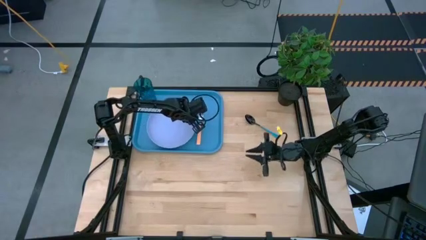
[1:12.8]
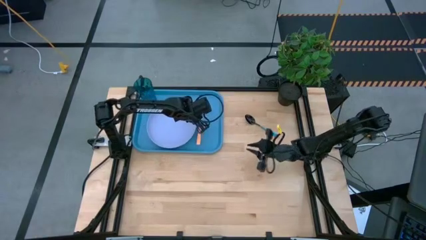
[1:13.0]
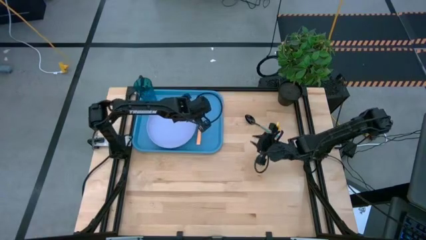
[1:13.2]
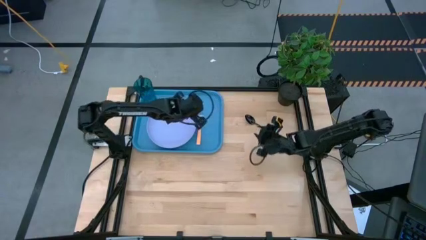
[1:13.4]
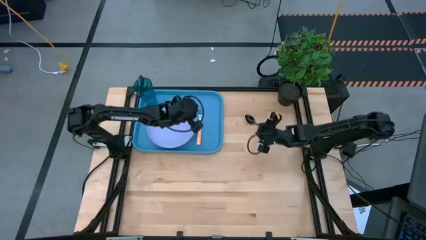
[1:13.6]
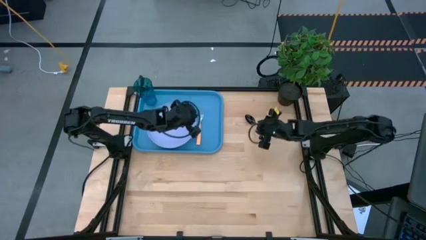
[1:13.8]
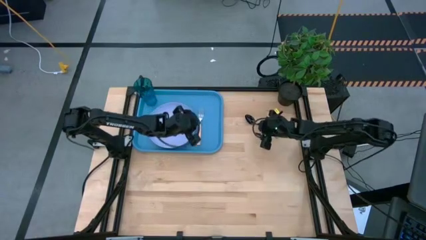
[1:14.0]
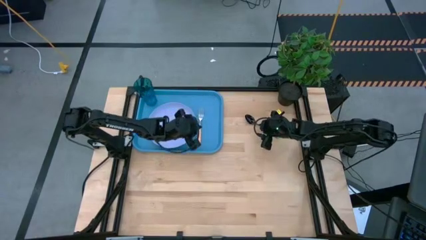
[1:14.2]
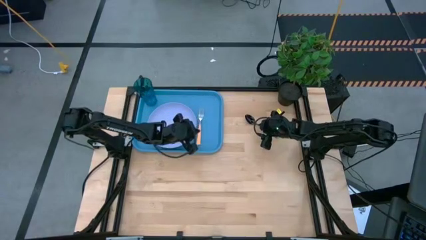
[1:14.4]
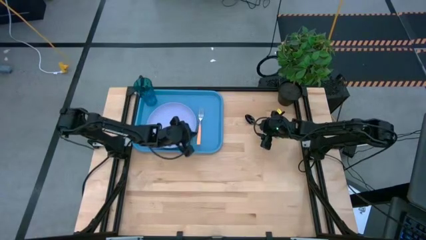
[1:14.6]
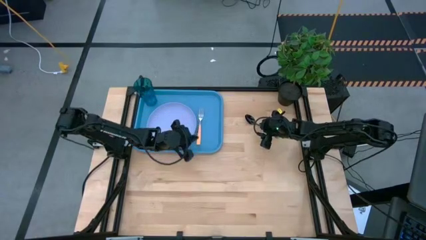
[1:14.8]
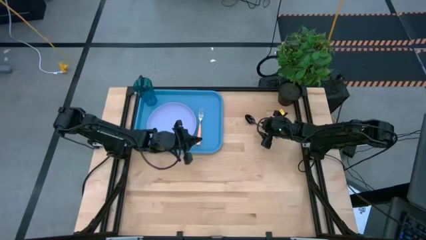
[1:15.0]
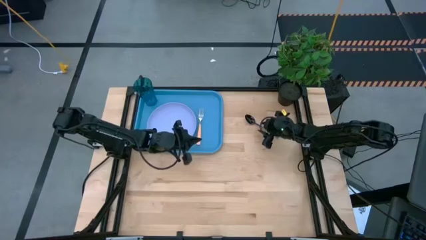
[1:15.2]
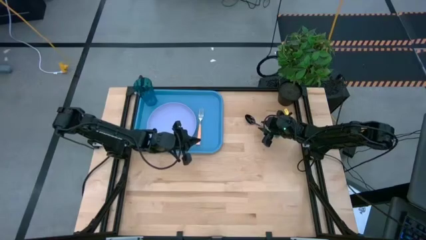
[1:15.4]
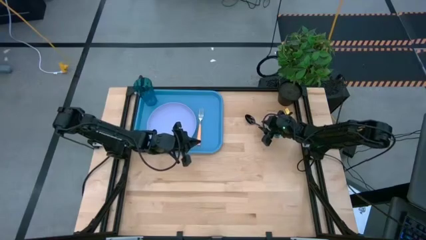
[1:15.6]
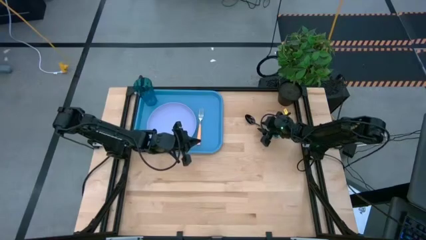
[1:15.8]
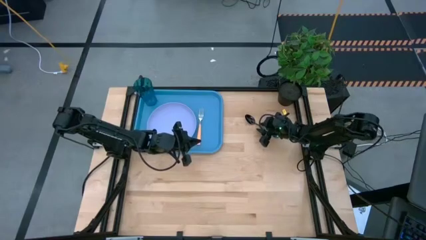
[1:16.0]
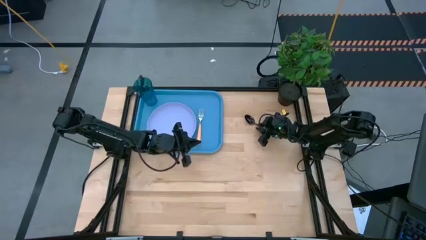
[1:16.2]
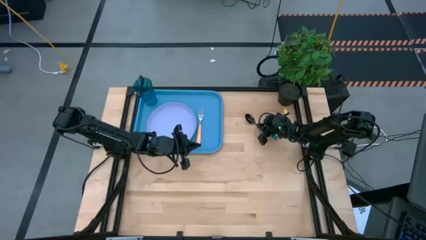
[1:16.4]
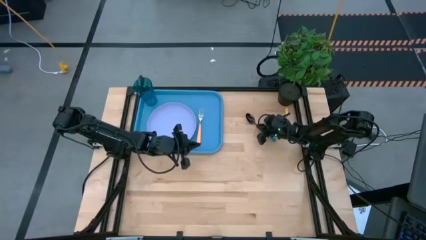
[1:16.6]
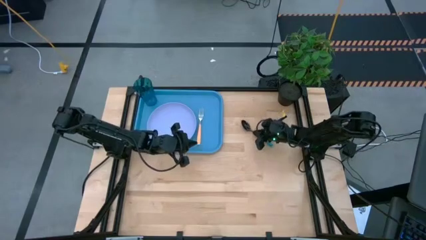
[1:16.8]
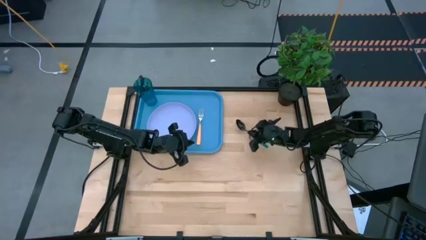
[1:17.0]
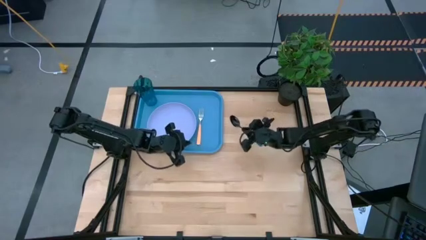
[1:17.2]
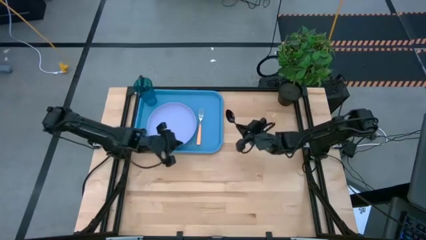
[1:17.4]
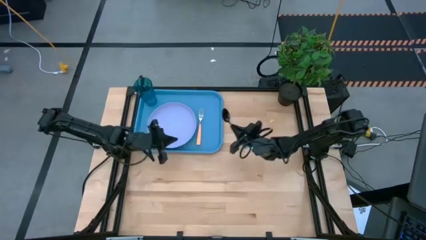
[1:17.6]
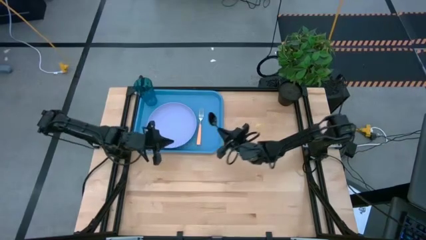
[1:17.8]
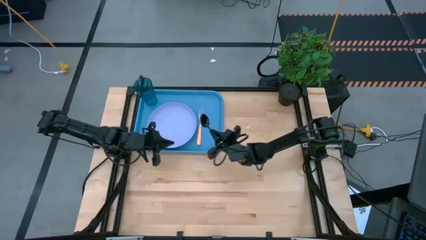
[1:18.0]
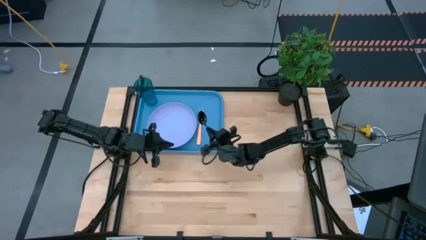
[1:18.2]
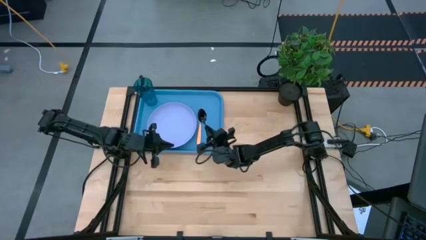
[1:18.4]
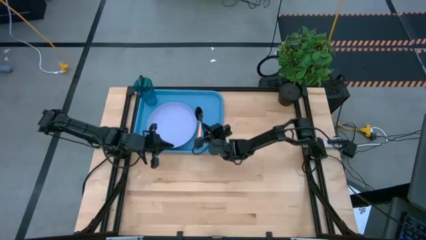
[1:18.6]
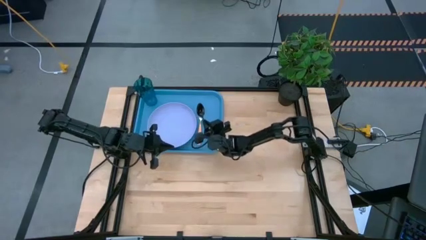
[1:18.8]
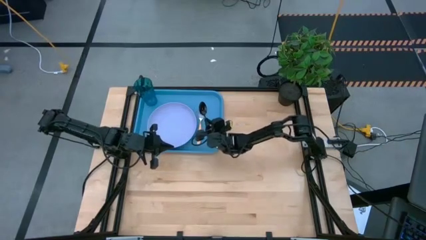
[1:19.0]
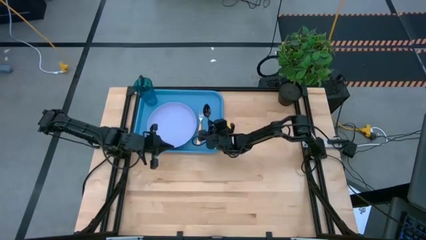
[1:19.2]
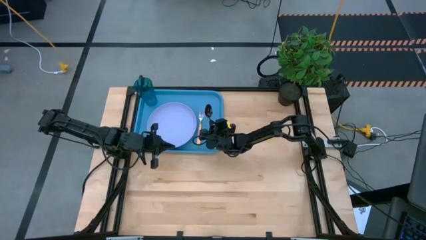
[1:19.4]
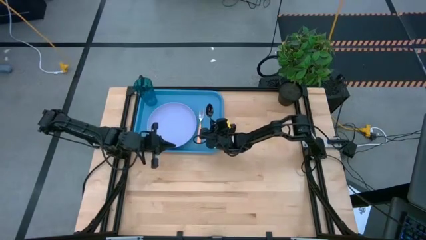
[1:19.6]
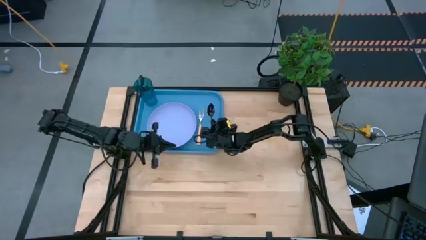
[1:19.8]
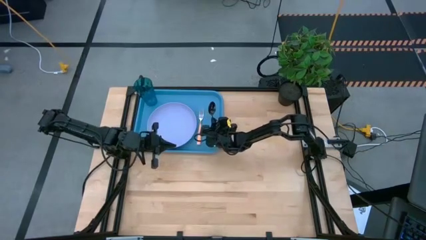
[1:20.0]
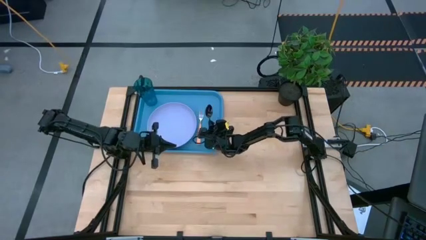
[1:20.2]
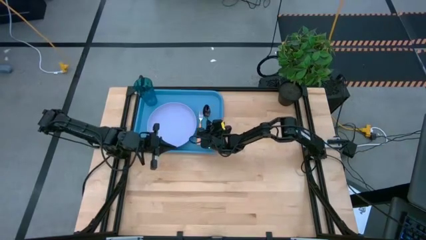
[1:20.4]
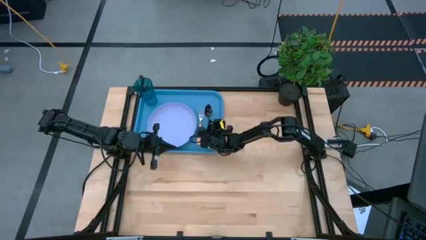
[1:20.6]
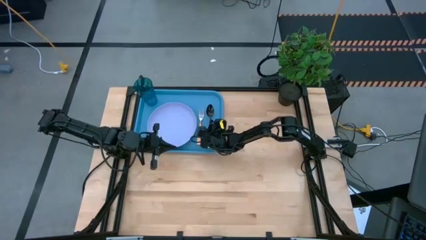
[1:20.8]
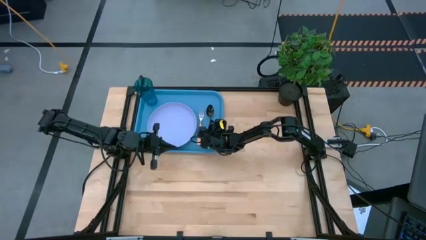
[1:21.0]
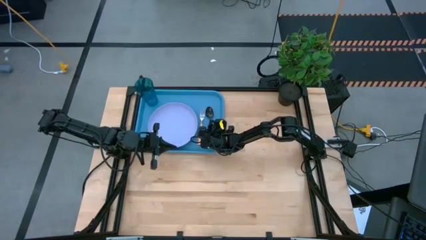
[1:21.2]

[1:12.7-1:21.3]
Task: Pick and place plate/cup/fork/spoon on tray
Put the blue spoon on the blue tray to the right of the orange fork

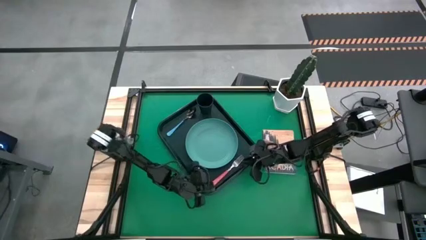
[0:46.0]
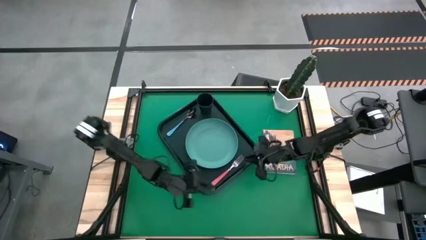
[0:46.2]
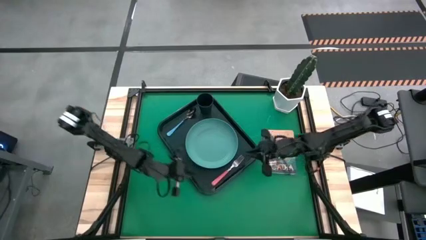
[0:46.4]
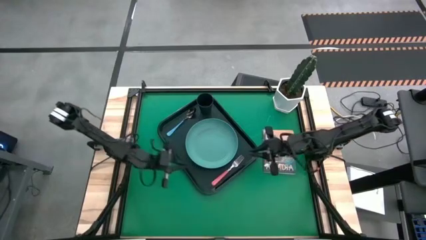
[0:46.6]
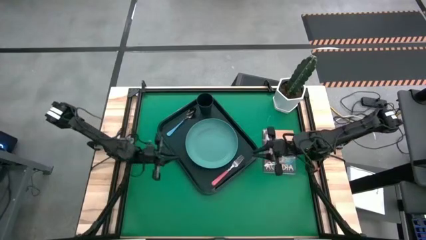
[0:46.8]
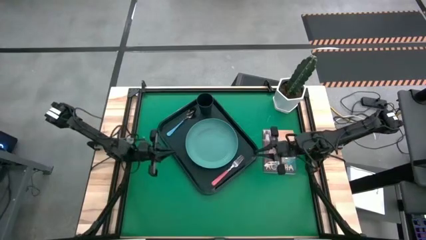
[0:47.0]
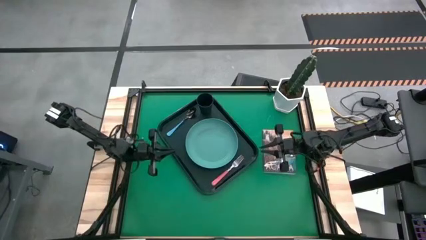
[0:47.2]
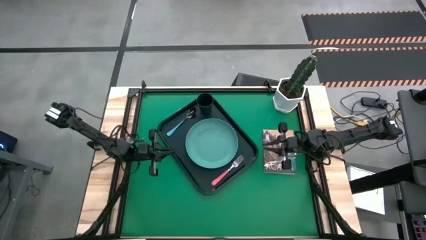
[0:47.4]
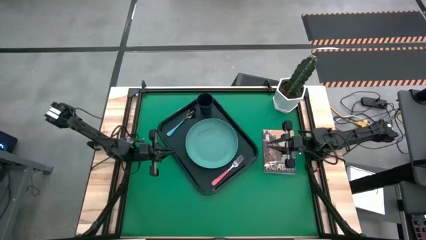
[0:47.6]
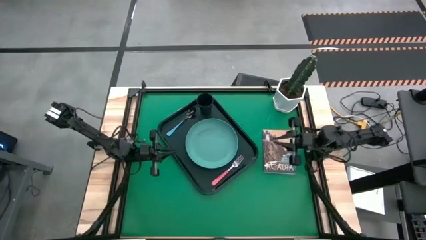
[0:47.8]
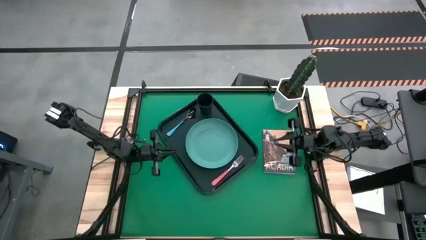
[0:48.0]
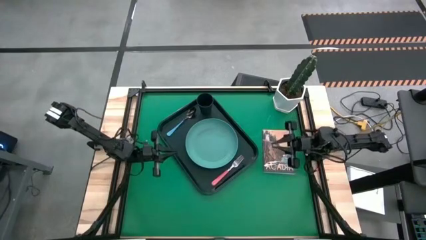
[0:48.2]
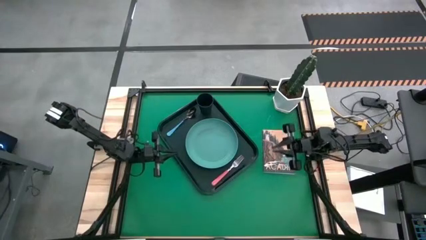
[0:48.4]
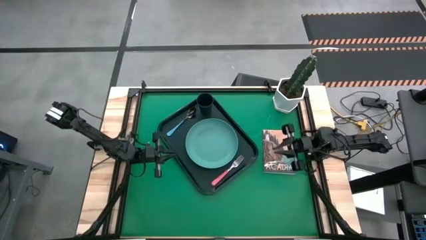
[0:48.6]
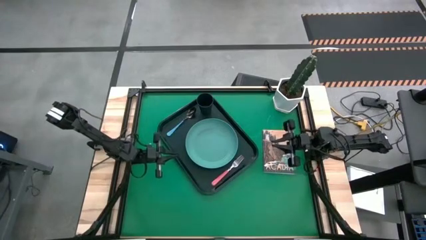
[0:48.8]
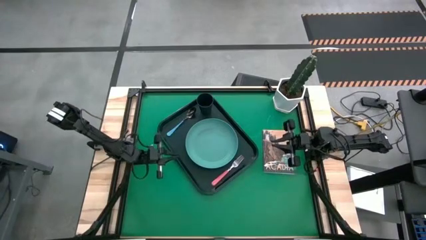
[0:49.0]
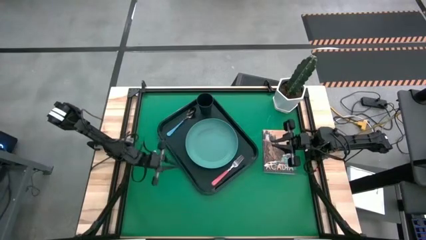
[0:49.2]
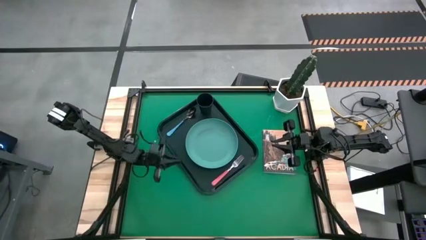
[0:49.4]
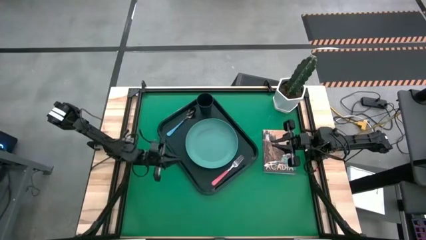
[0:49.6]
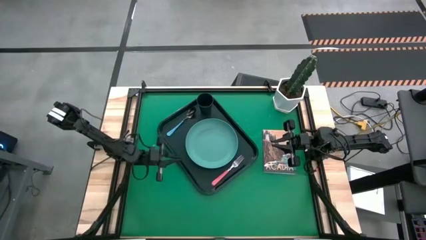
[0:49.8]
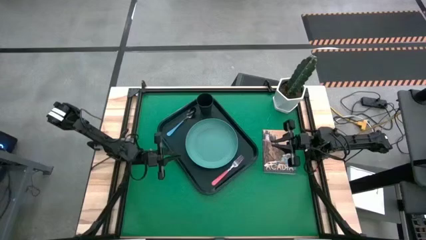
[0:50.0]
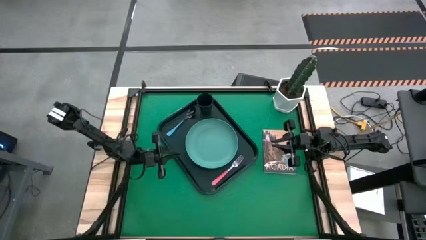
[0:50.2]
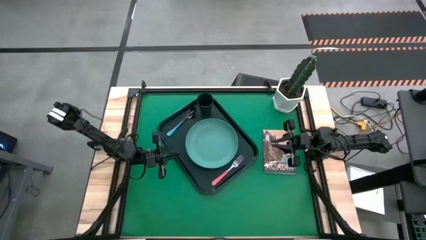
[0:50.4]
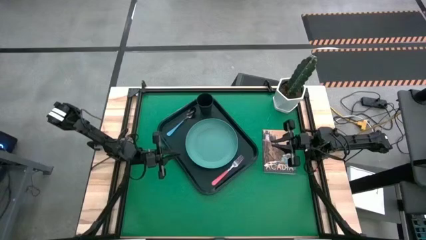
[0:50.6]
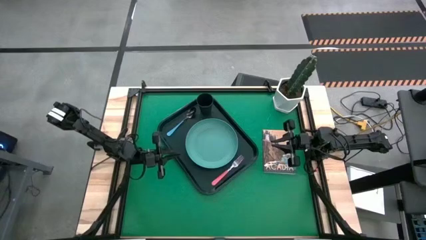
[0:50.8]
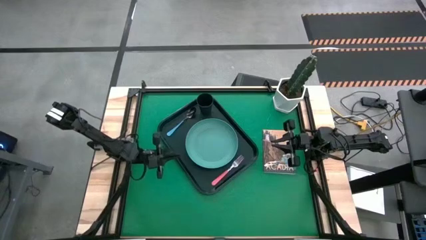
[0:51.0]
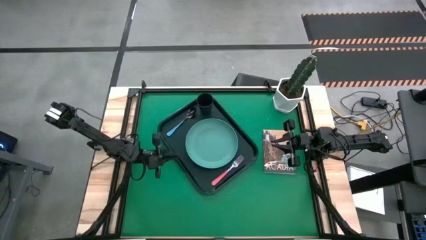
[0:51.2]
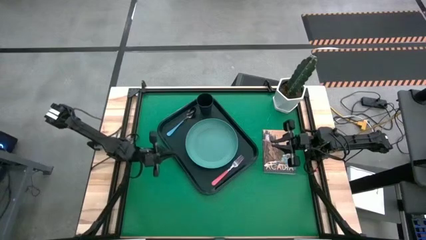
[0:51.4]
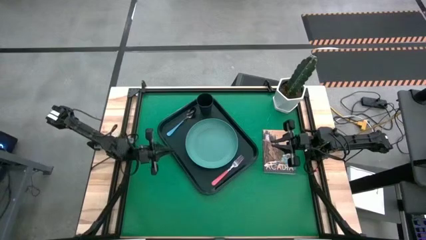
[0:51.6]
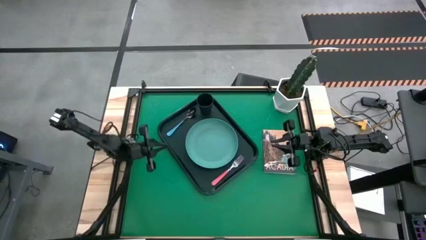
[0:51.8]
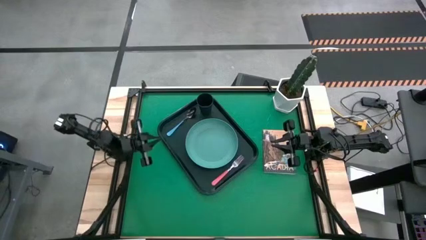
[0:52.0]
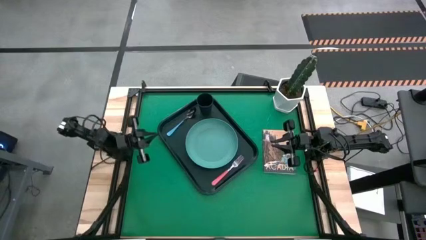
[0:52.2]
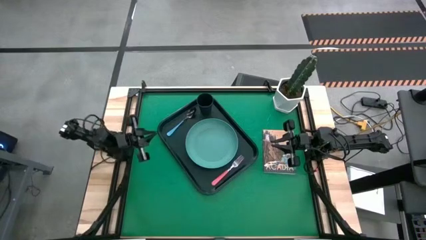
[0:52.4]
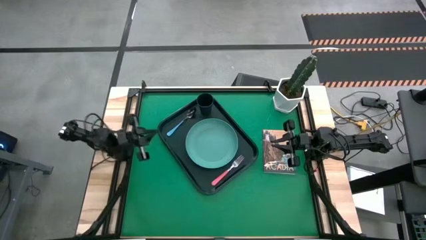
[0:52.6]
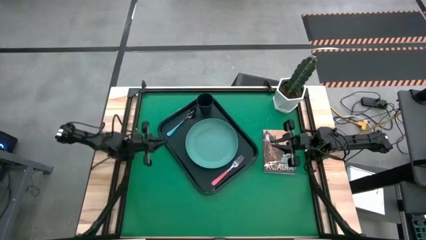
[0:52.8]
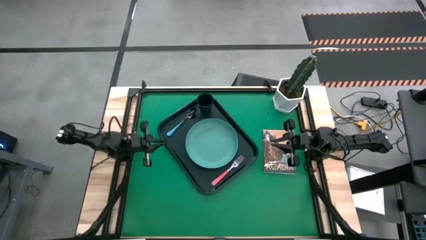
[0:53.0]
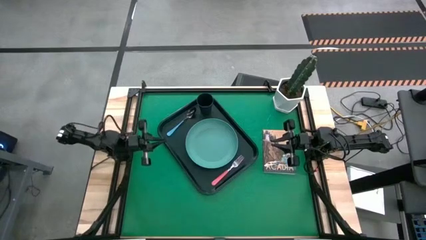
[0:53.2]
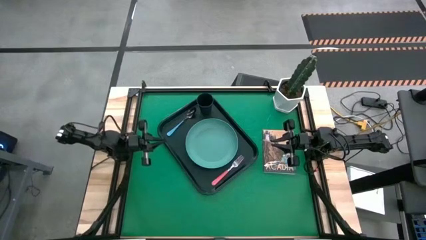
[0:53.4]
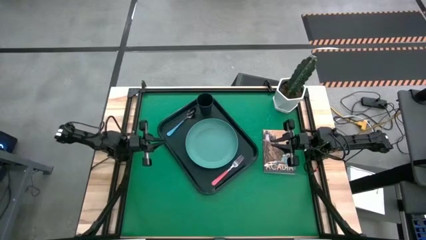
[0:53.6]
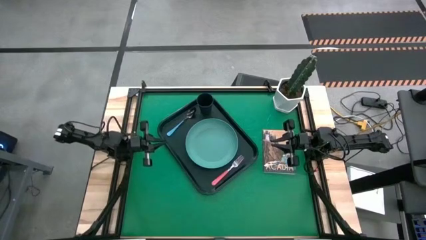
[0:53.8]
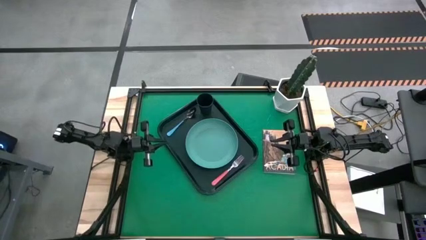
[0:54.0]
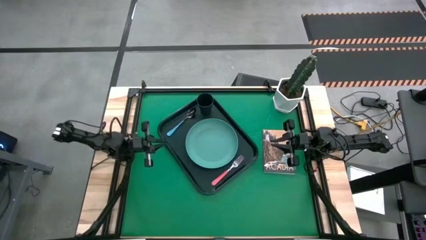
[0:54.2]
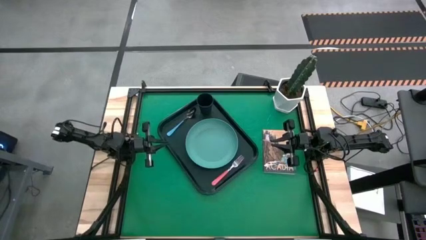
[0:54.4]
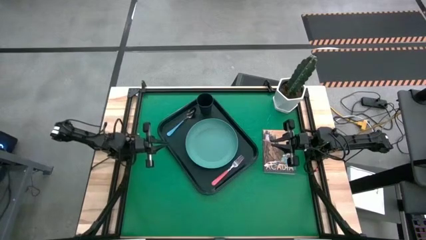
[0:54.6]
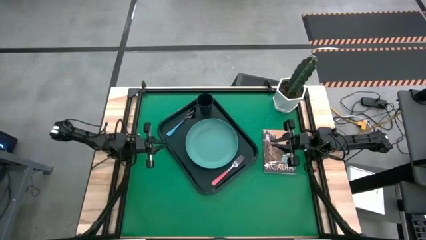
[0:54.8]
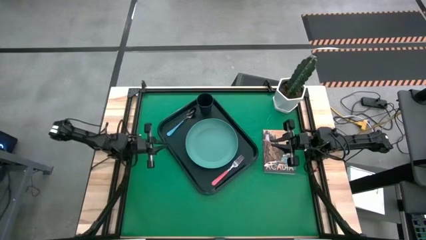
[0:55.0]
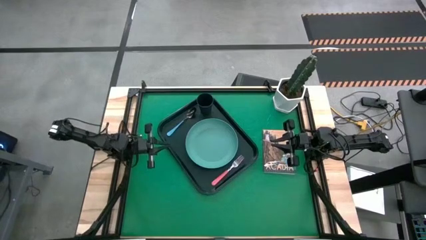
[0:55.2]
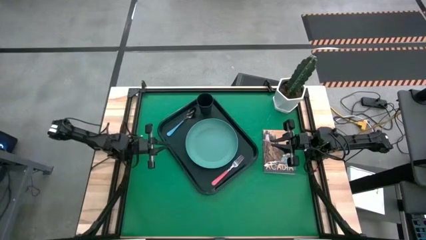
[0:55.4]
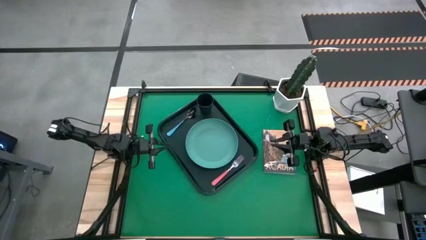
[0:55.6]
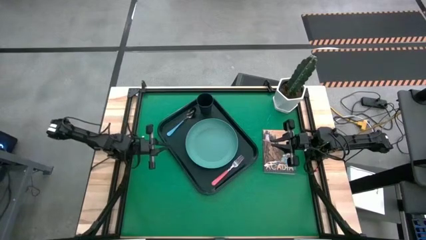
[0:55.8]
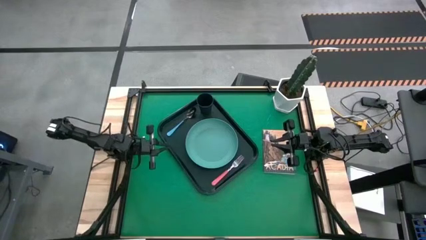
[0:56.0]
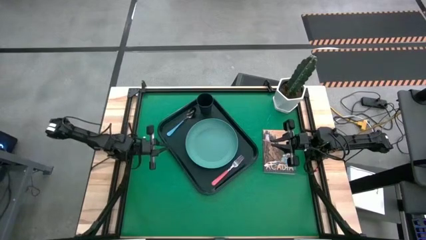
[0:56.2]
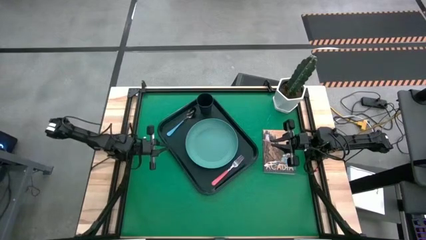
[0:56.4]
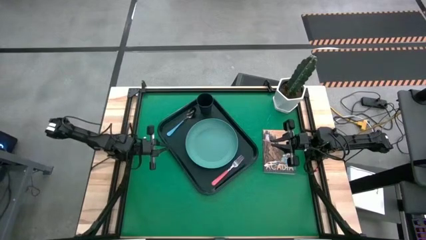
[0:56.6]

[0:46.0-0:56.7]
Task: Pick and place plate/cup/fork/spoon on tray
Return to Home Position
